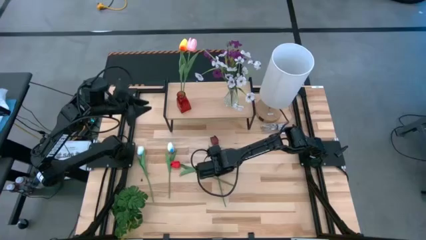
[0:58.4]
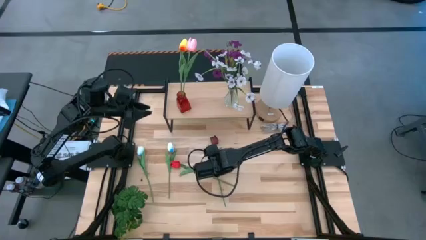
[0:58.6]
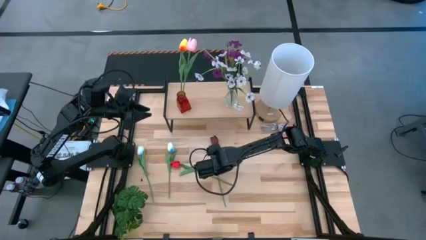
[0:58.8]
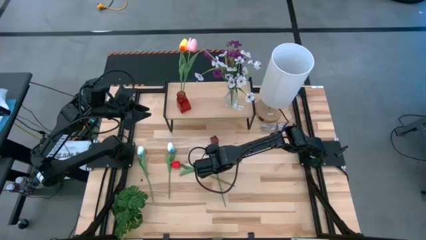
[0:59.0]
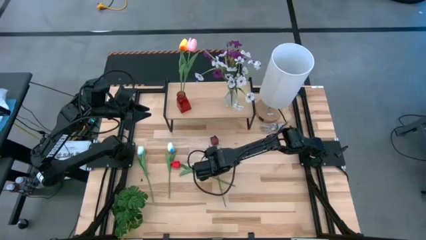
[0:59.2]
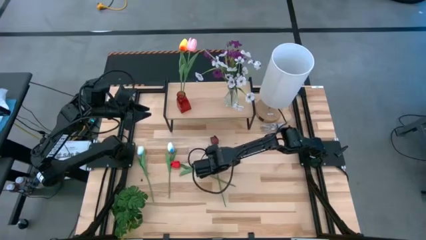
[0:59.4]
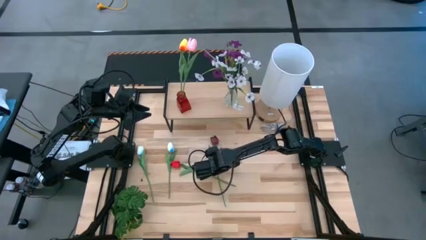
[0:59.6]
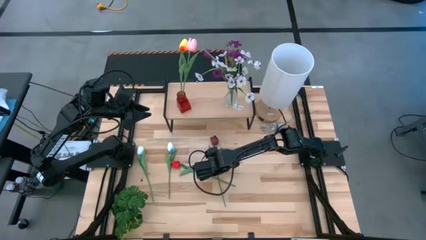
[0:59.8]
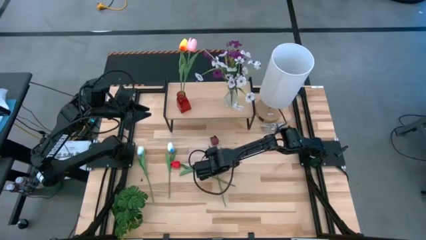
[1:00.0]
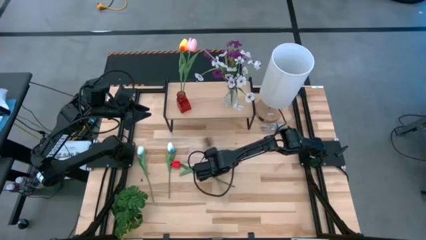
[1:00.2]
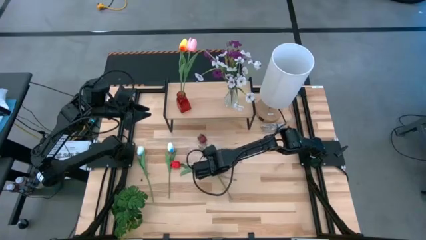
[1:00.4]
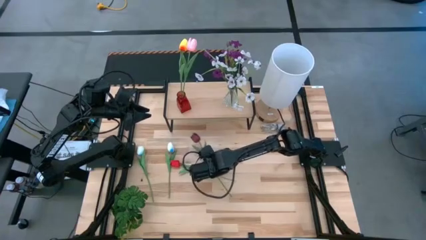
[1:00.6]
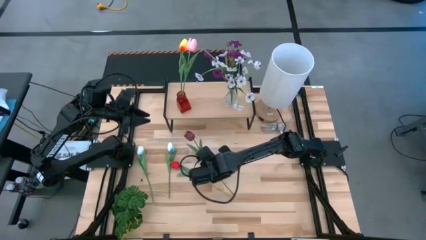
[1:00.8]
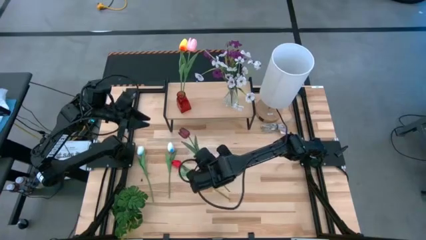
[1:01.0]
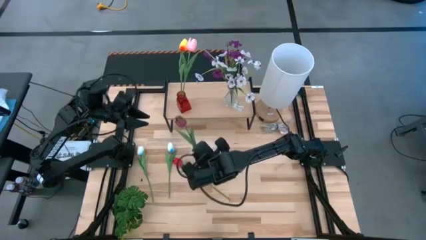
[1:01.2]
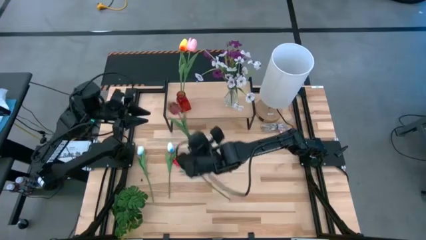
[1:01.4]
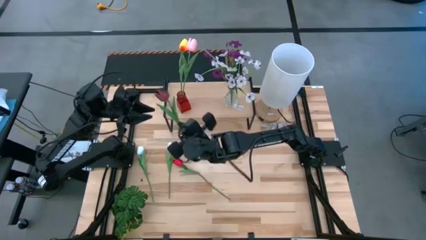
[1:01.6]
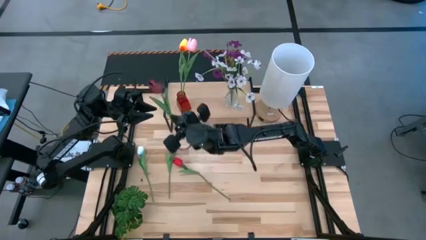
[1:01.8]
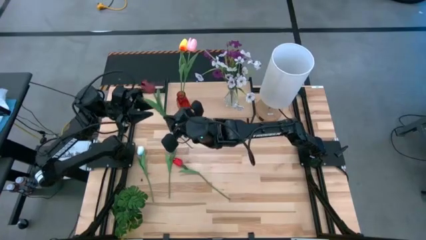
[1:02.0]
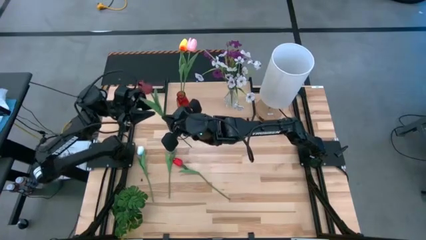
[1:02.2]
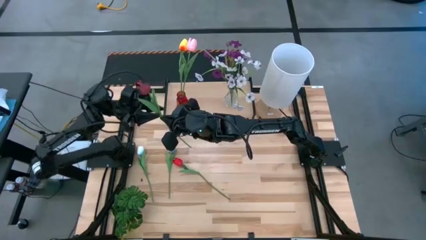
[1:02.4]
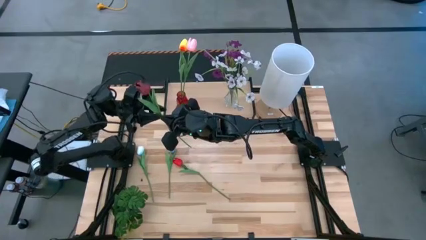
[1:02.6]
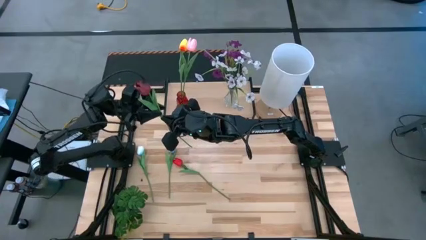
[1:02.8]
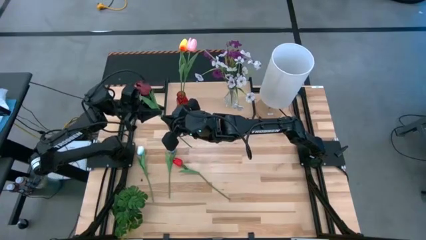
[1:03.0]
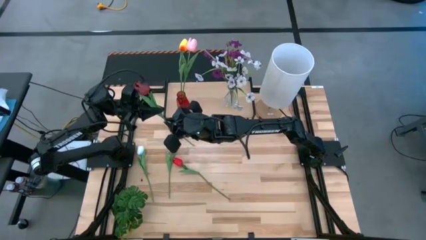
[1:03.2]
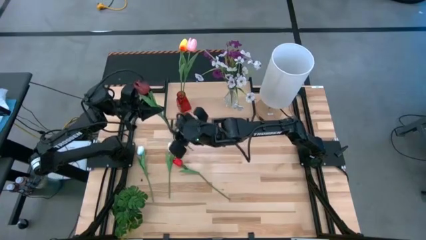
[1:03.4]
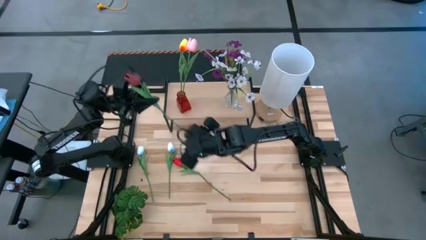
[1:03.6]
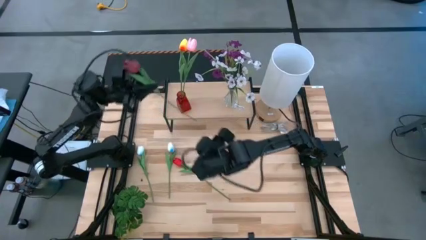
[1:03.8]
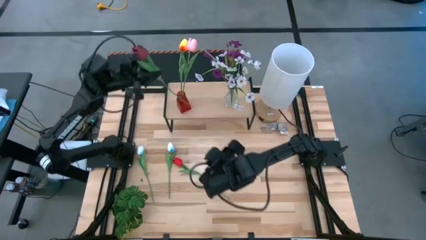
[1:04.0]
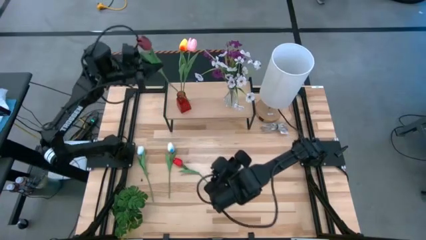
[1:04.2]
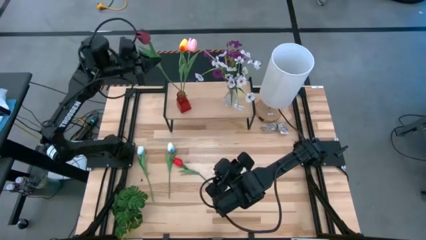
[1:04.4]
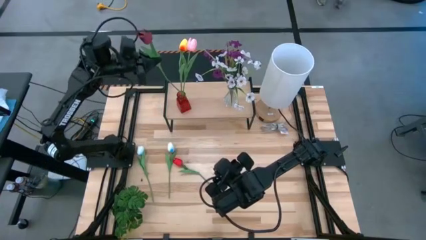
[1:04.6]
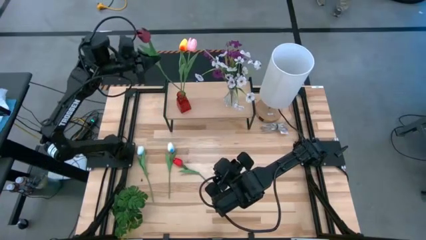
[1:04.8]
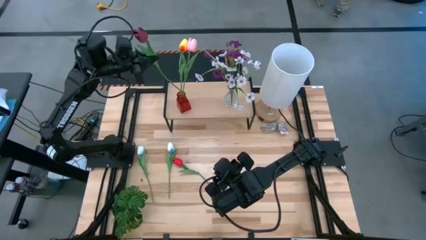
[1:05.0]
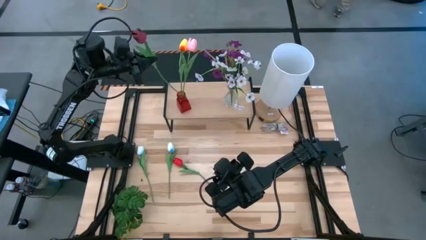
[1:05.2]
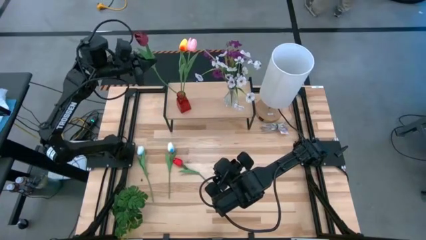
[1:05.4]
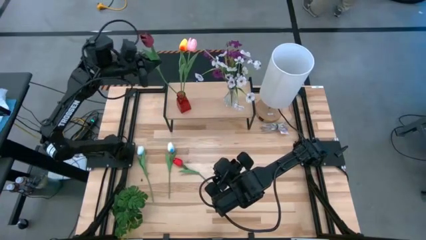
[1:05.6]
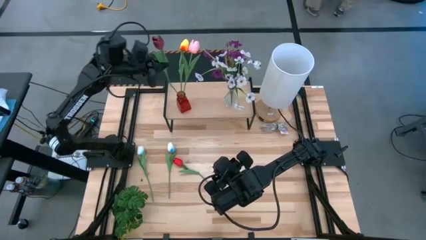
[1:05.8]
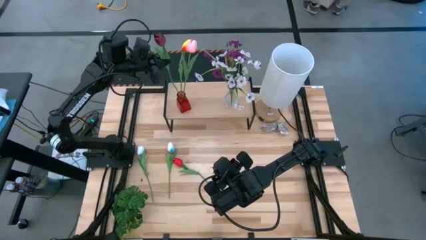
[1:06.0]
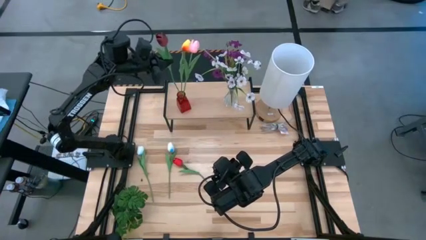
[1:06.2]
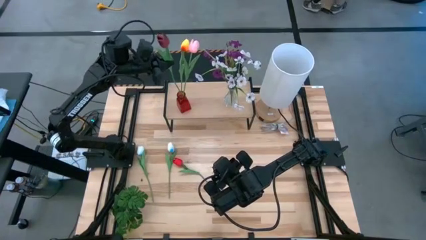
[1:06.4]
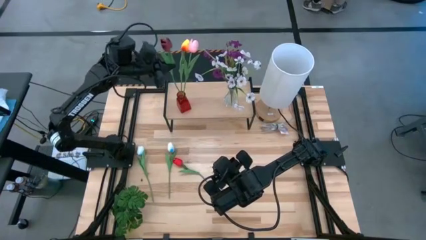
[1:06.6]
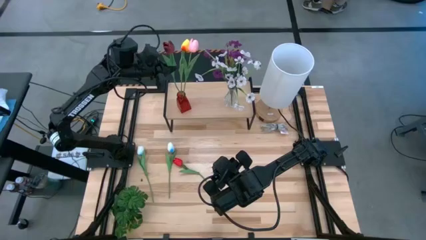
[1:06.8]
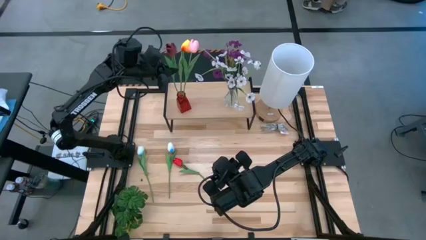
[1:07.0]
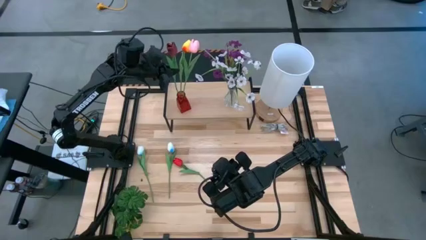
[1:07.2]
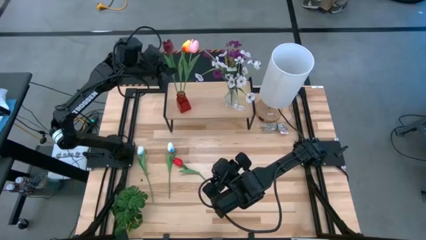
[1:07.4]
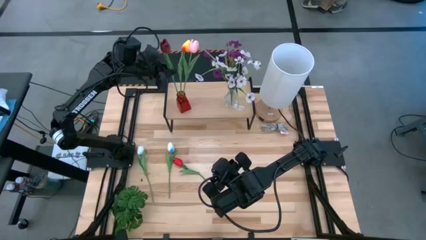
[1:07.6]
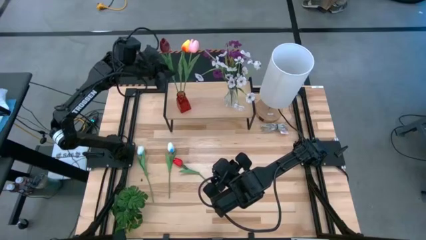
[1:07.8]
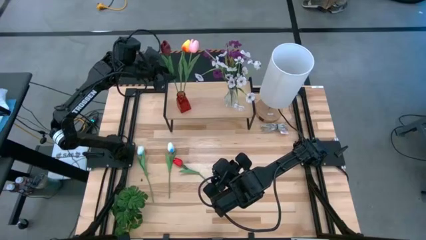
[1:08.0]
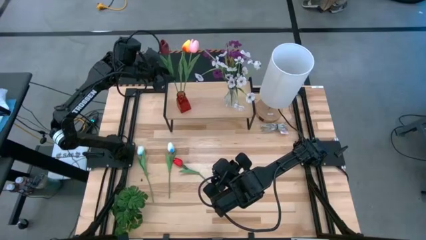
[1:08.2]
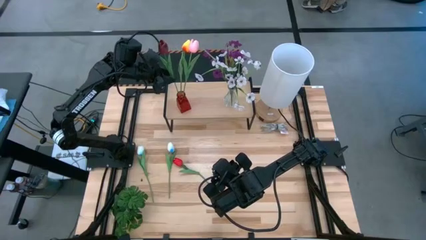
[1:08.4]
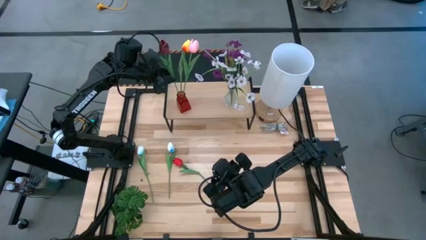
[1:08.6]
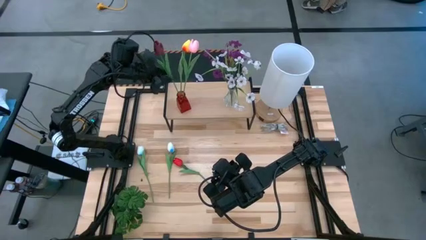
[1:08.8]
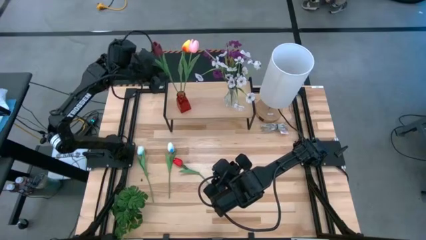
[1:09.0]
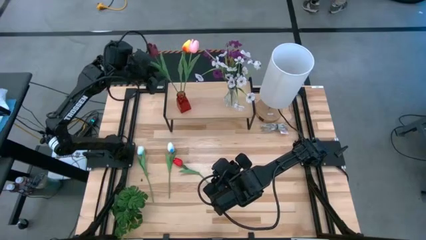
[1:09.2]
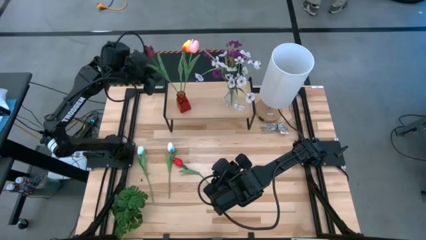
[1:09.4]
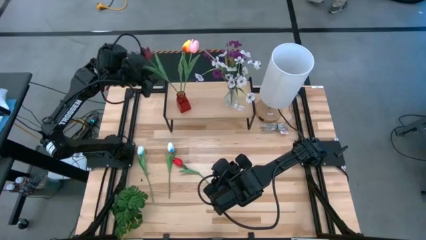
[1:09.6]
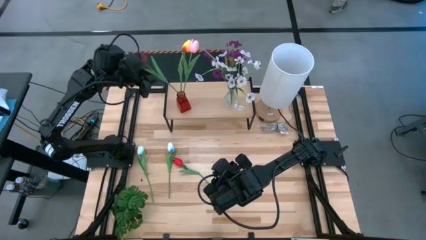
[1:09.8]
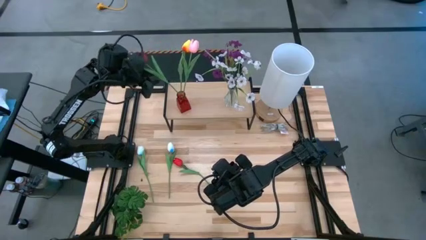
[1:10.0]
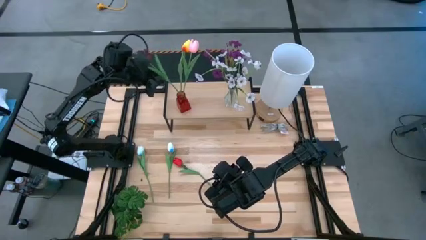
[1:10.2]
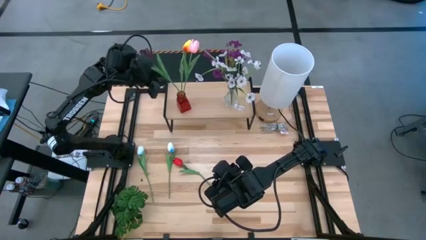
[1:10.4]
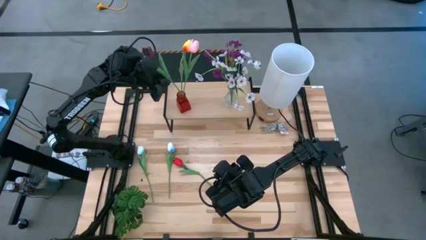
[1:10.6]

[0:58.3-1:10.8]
Task: Pick and place flowers into a vace then onto a shelf
Put the dark red flower into the red vase on the shelf

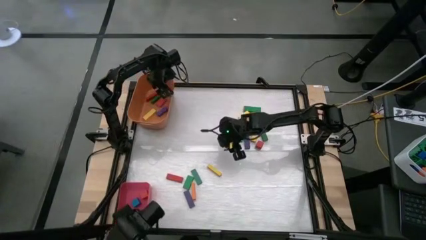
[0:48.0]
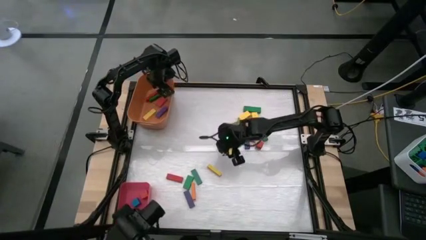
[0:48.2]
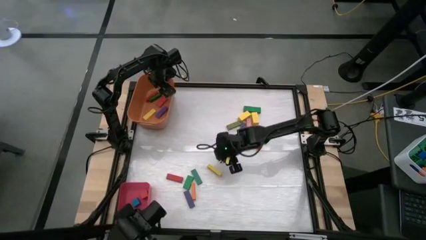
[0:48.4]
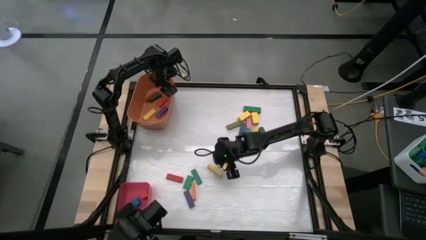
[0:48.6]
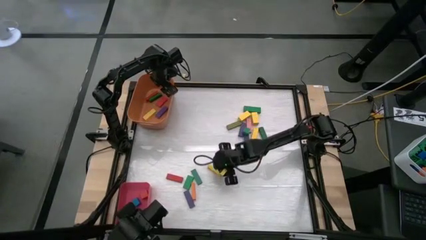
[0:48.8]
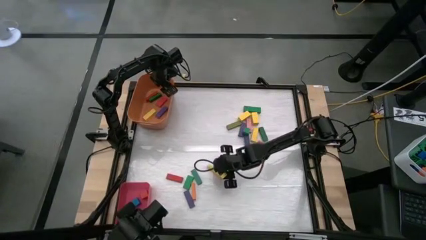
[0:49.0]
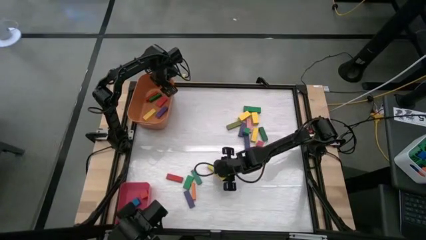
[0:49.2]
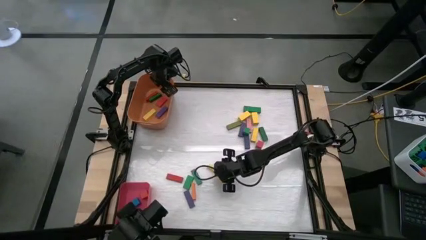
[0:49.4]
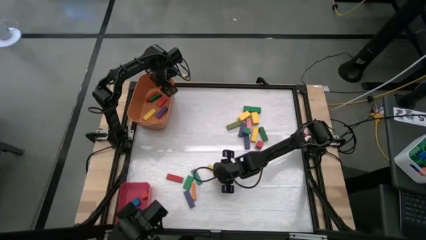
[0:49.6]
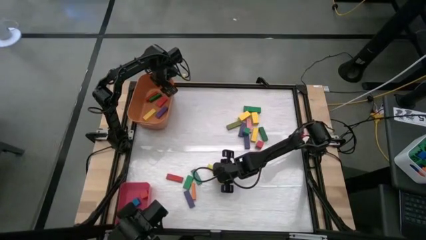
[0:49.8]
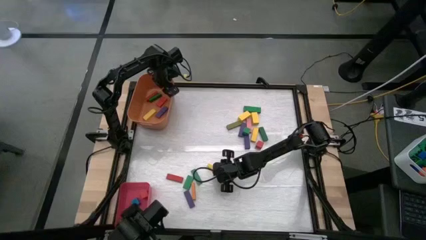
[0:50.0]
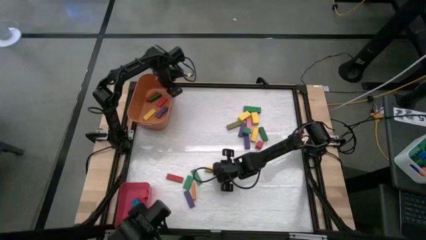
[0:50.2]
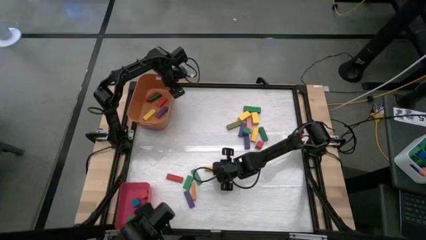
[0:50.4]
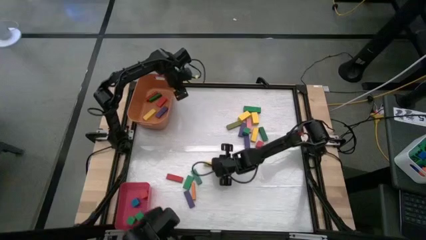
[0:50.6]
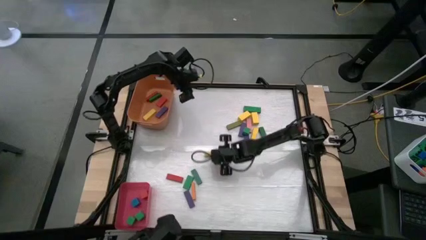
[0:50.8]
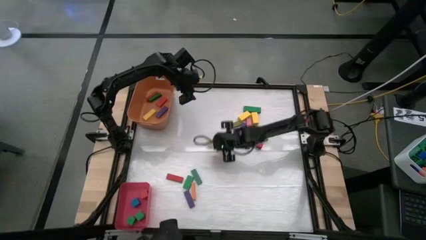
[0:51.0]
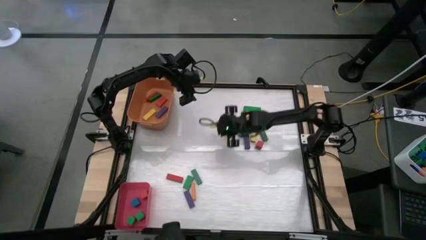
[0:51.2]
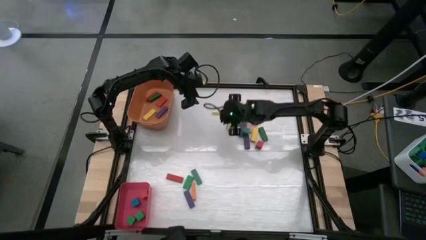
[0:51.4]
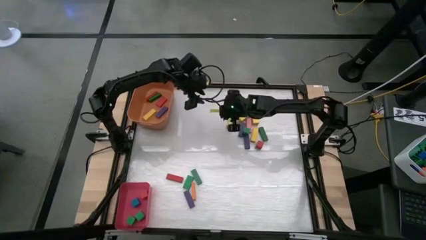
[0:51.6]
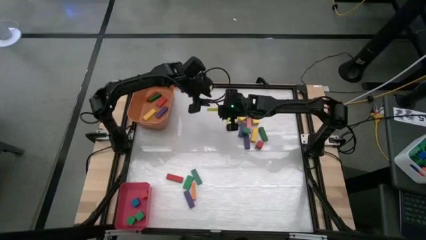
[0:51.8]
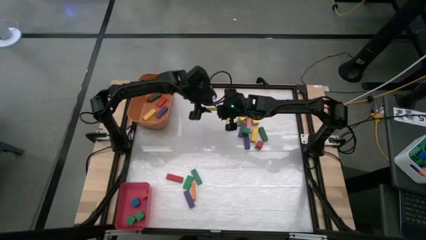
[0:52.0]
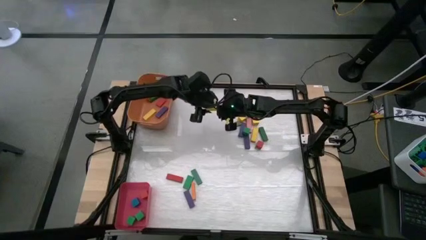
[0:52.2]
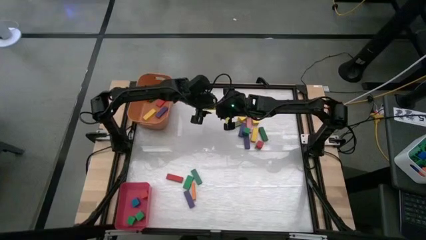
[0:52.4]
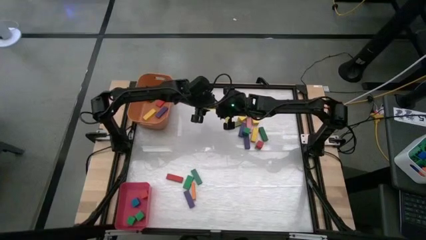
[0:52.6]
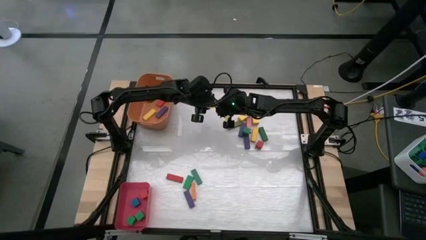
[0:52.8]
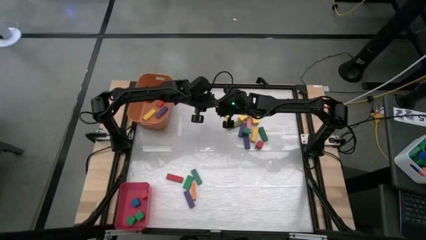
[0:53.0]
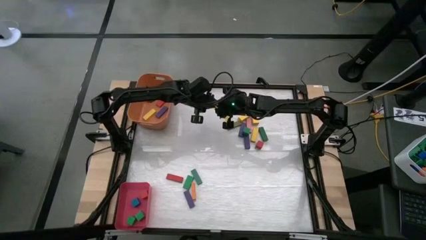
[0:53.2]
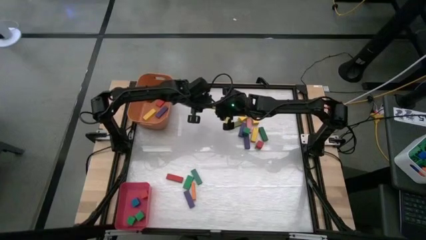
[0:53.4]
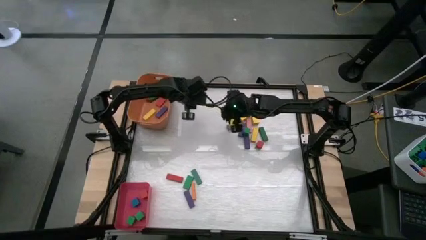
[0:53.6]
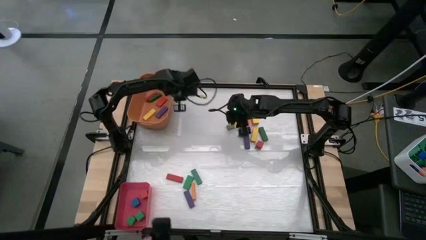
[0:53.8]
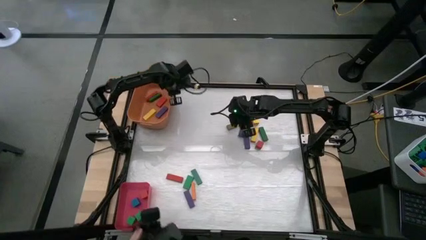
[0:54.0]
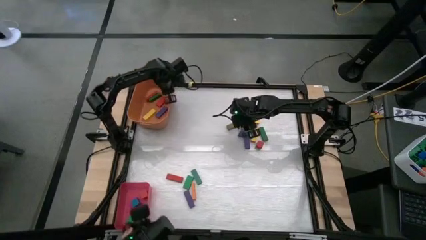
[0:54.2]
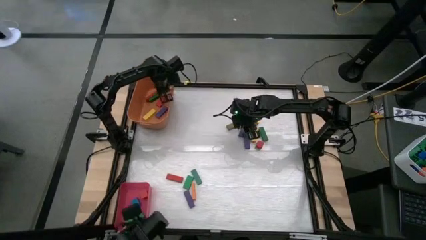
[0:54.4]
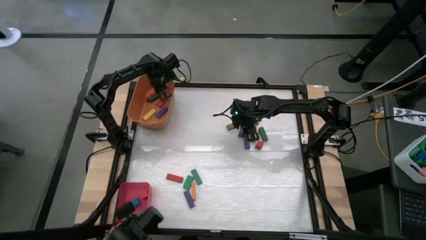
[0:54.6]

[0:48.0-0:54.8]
Task: Sort blocks by size
Put the big yellow block into the orange bin
